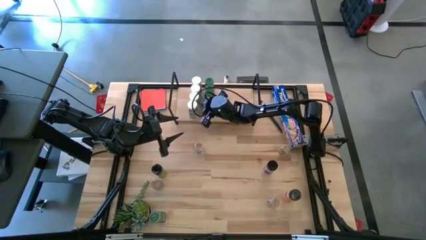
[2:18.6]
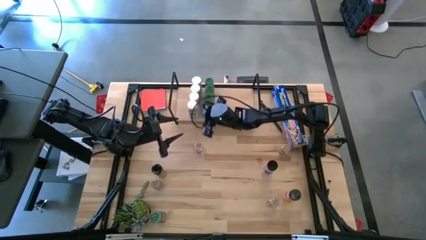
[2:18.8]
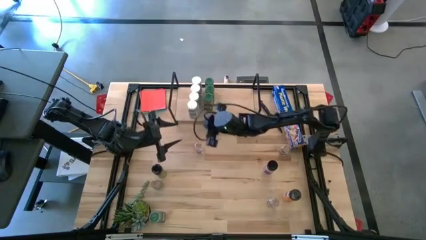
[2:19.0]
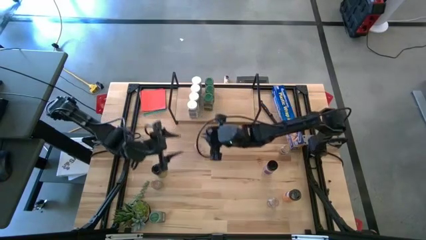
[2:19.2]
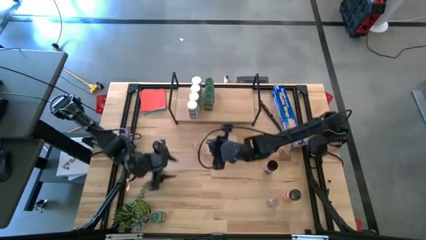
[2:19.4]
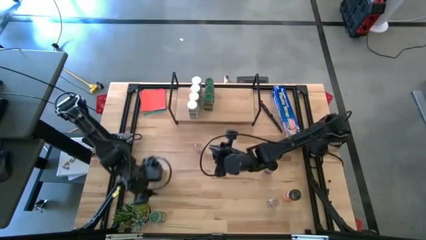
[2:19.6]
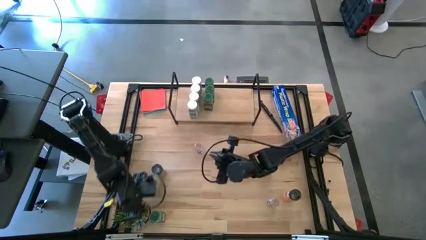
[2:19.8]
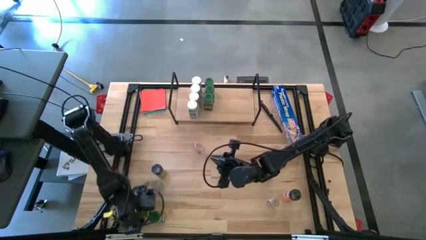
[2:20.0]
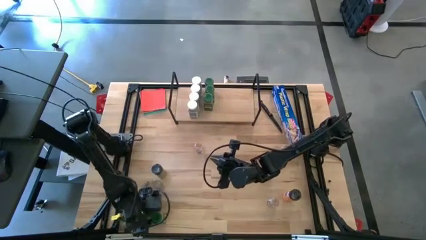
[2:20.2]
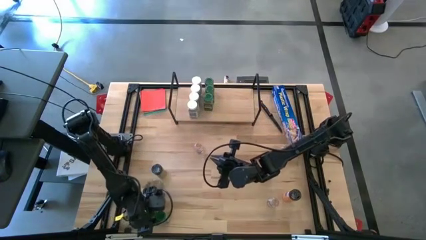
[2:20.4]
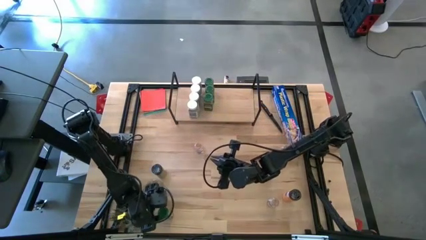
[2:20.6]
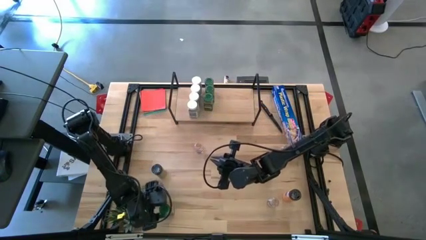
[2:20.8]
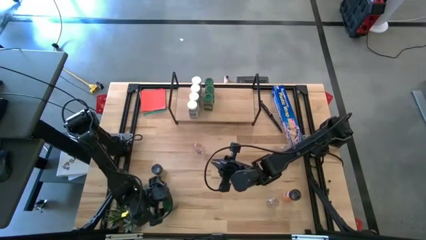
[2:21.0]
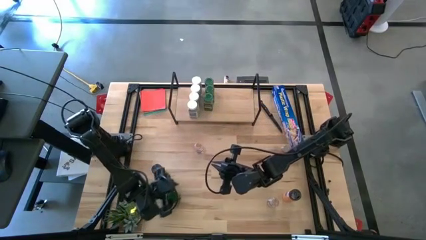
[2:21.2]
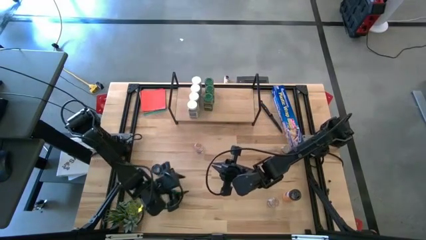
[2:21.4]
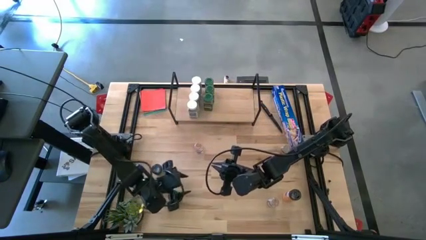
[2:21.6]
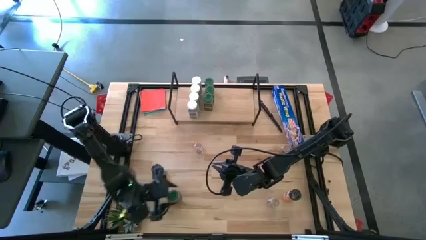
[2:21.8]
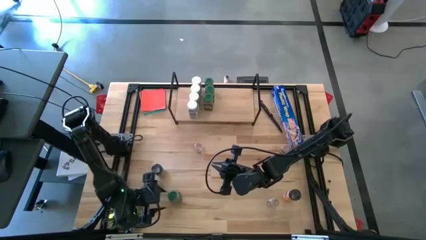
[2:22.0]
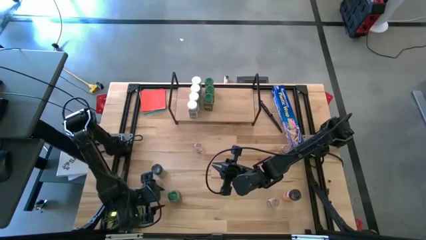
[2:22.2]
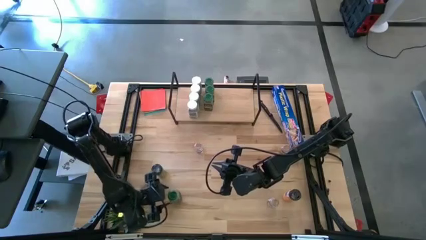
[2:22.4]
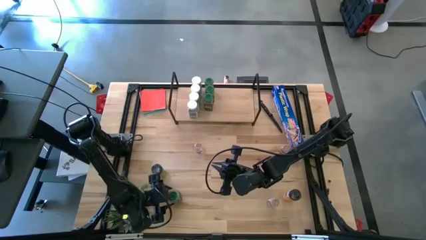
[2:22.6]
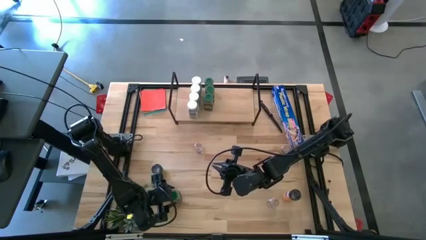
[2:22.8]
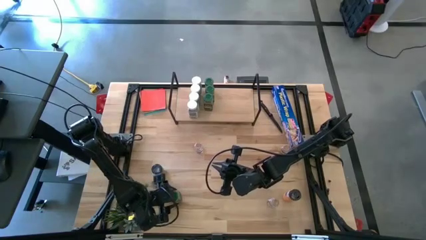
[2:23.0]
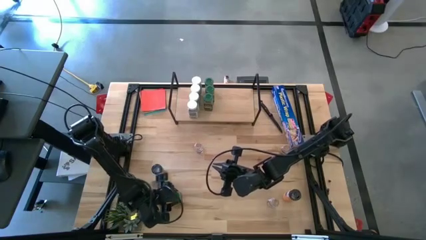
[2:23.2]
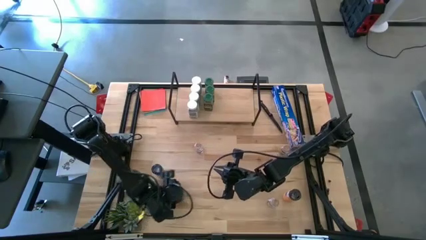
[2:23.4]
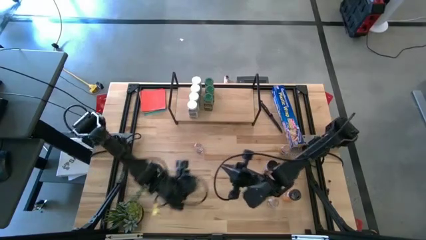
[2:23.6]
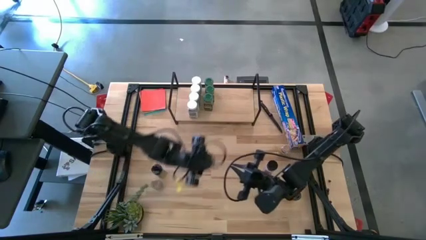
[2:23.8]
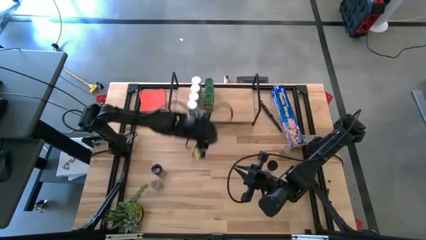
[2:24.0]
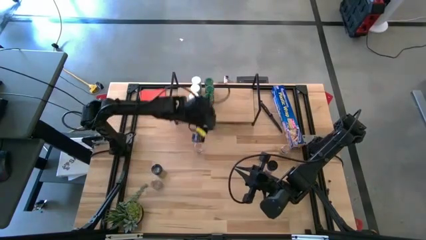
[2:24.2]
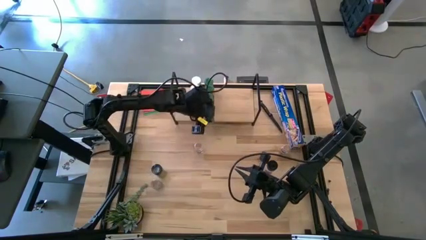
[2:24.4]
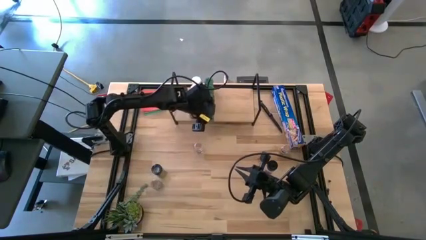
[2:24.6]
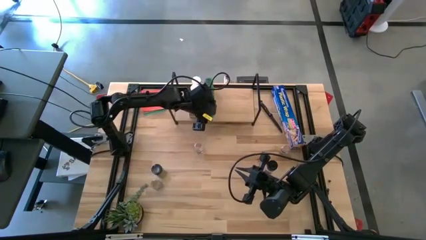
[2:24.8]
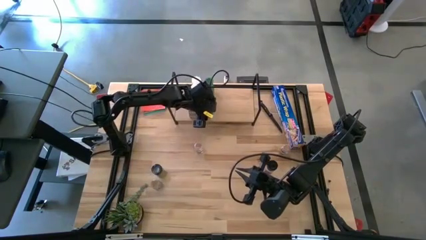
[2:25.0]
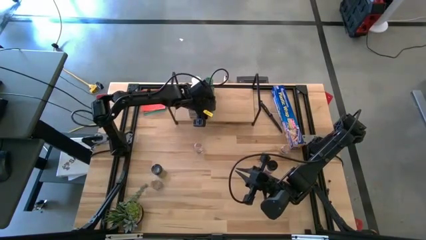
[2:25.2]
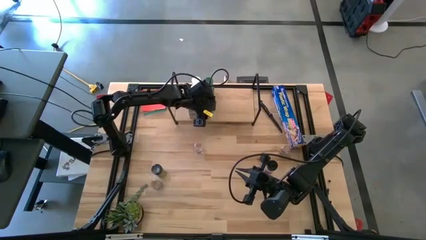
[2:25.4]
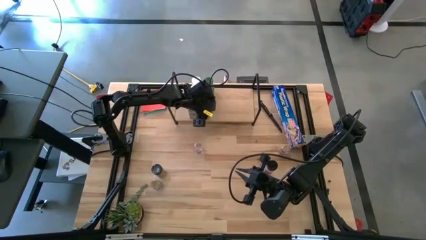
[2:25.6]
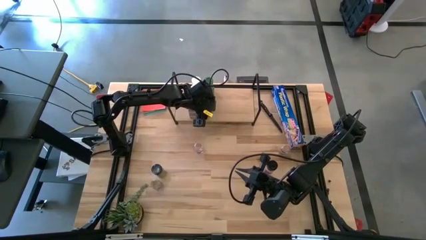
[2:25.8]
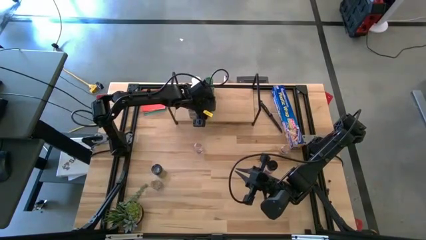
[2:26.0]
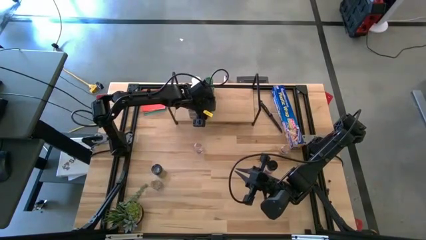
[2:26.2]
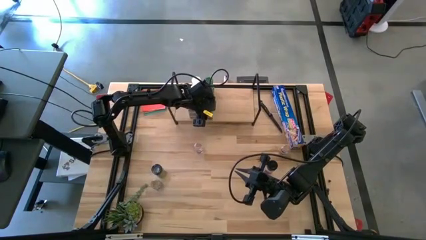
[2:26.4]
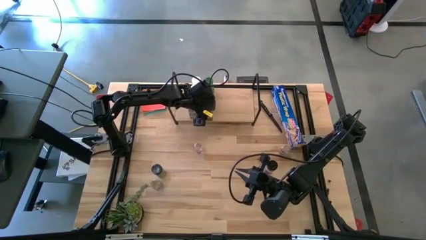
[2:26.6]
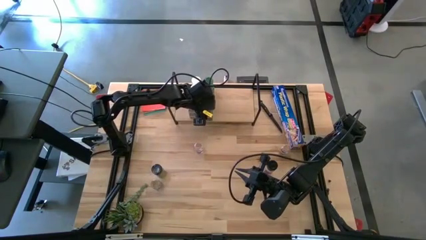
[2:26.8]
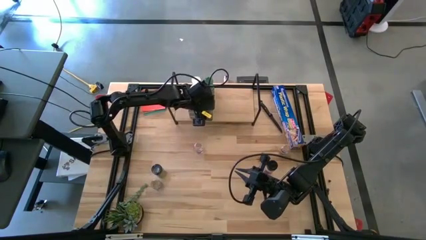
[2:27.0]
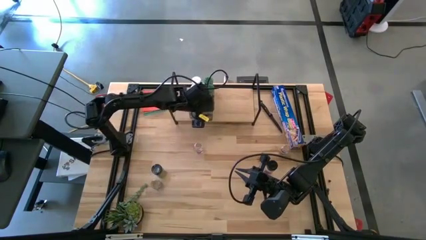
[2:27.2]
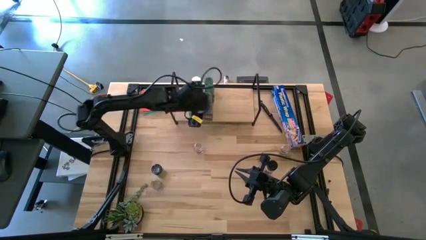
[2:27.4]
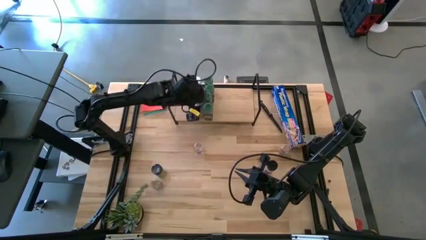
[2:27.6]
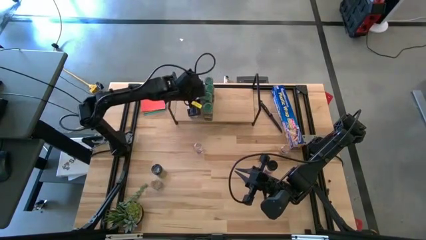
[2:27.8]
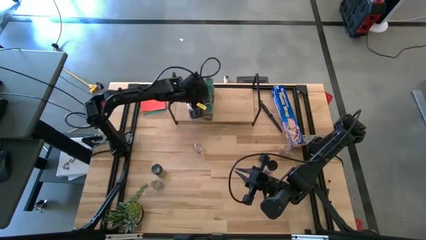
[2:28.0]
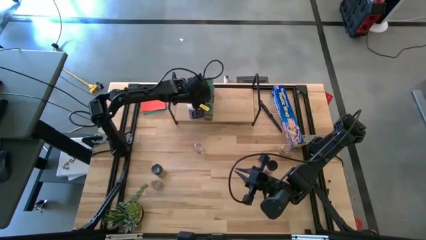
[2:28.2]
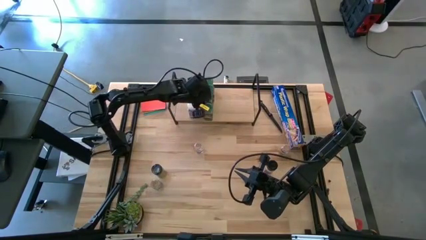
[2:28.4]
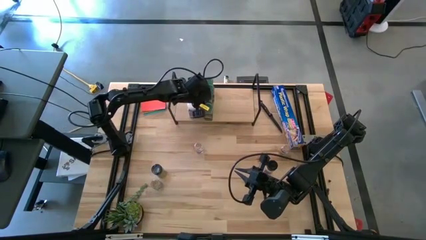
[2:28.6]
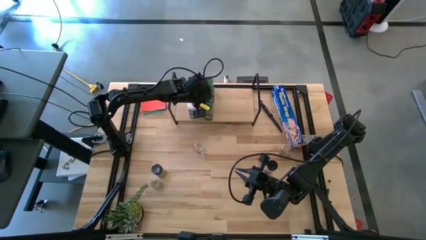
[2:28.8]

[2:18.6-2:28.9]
Task: Shelf spices
Put the green seasoning bottle on the shelf

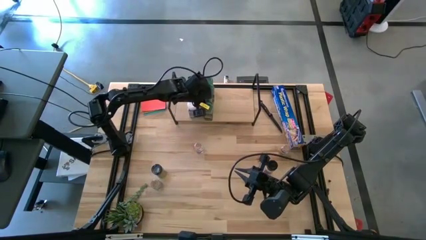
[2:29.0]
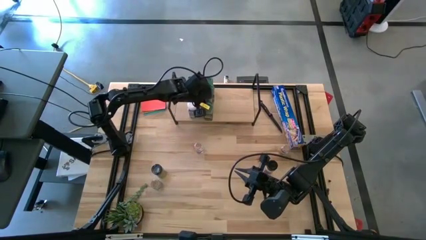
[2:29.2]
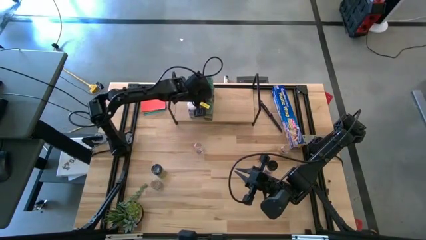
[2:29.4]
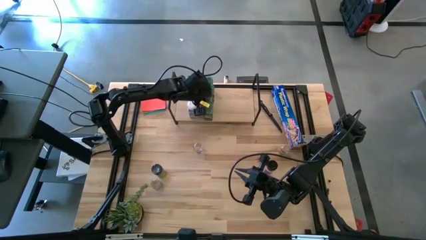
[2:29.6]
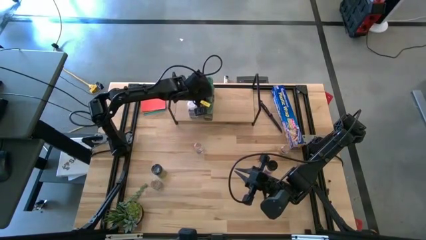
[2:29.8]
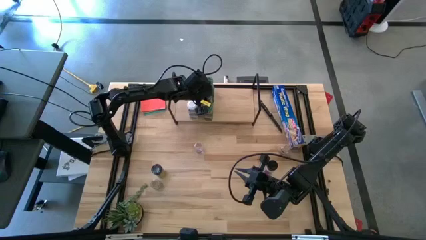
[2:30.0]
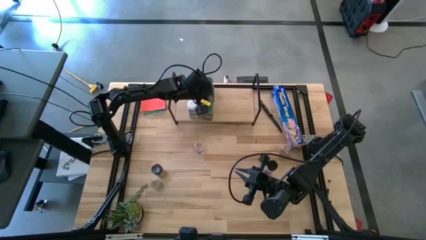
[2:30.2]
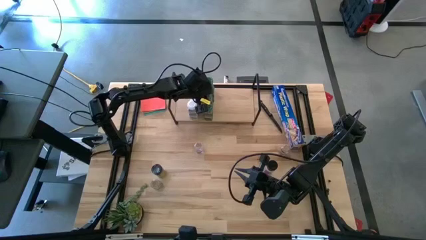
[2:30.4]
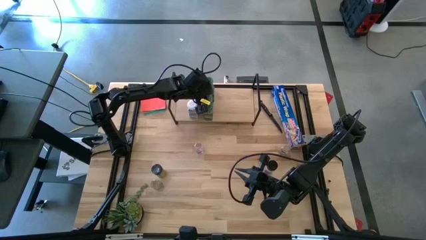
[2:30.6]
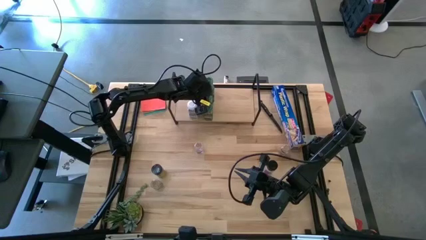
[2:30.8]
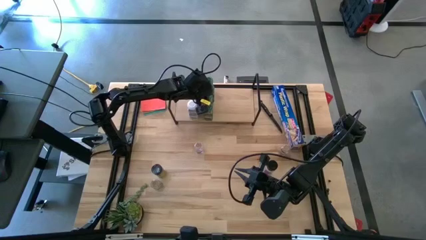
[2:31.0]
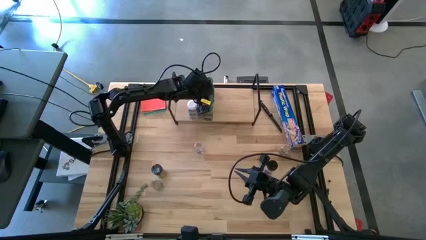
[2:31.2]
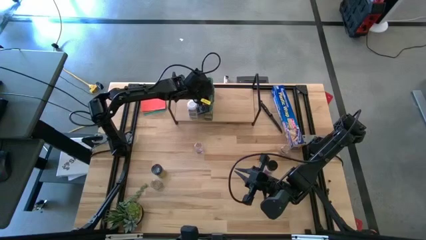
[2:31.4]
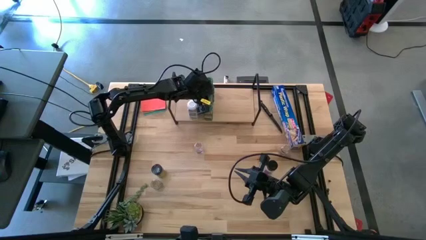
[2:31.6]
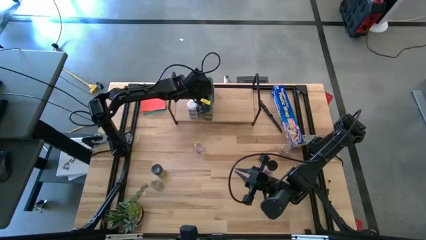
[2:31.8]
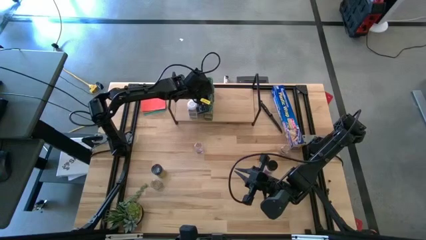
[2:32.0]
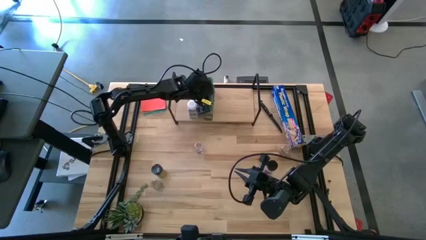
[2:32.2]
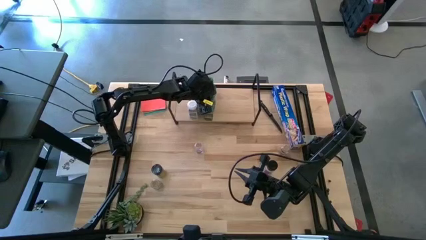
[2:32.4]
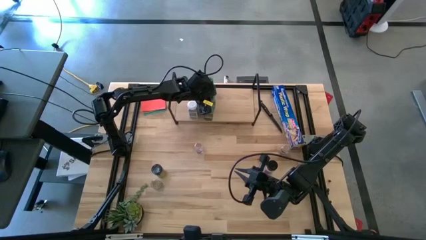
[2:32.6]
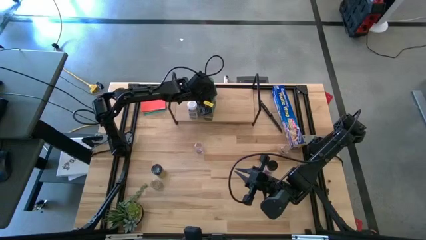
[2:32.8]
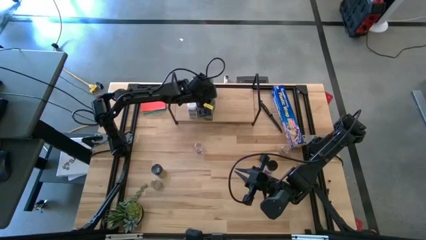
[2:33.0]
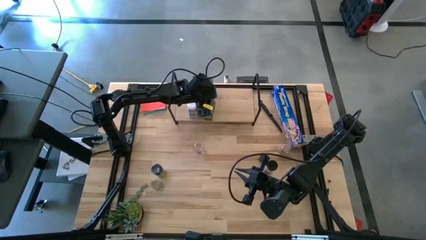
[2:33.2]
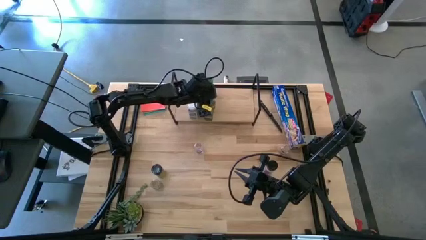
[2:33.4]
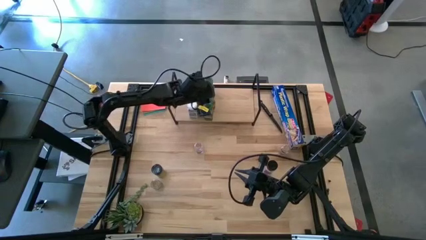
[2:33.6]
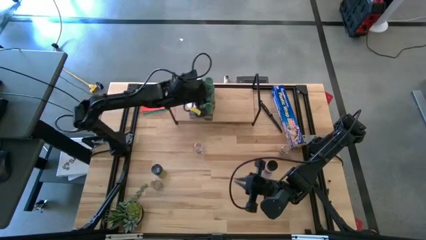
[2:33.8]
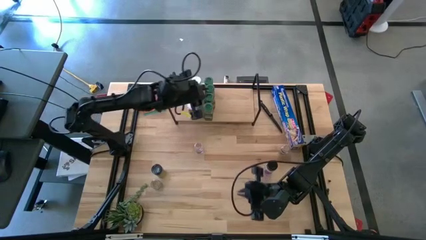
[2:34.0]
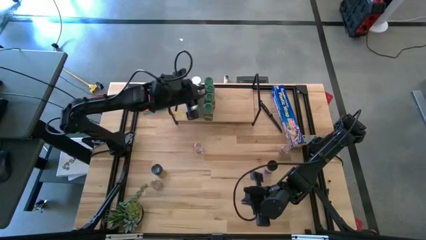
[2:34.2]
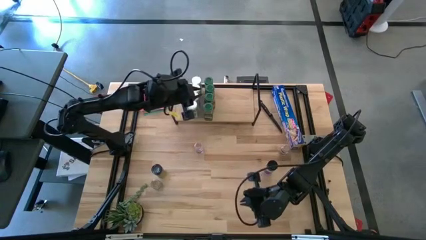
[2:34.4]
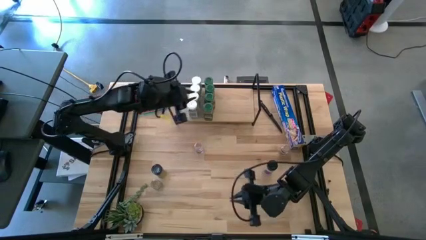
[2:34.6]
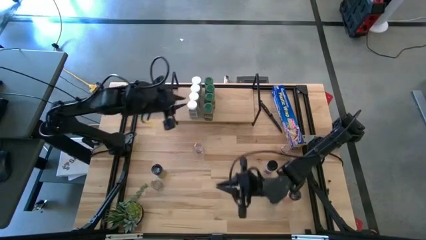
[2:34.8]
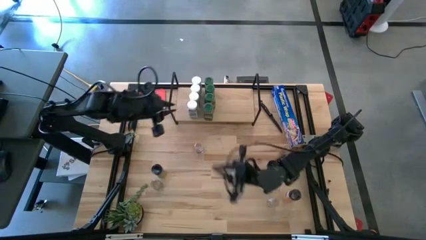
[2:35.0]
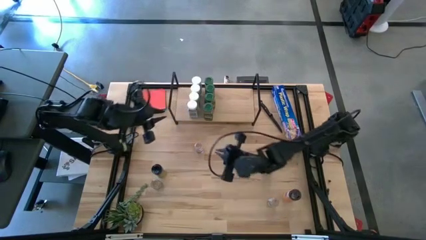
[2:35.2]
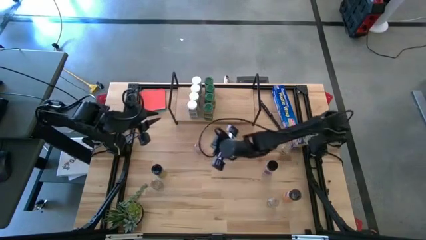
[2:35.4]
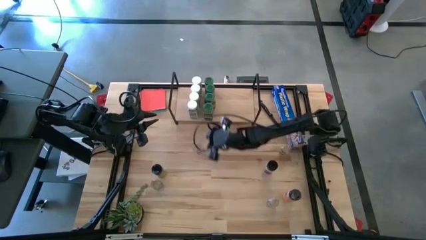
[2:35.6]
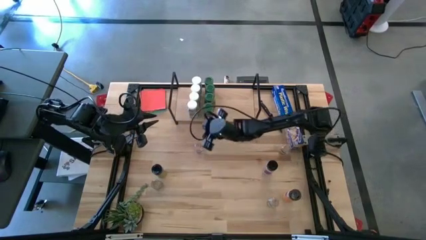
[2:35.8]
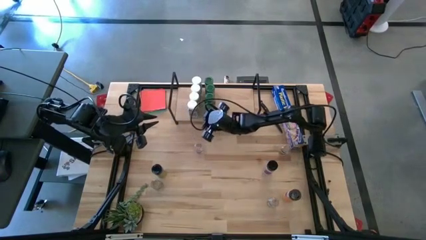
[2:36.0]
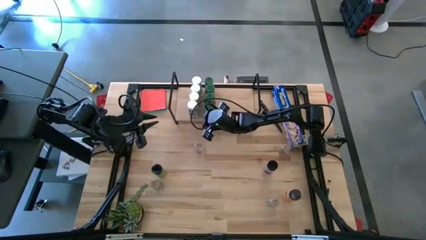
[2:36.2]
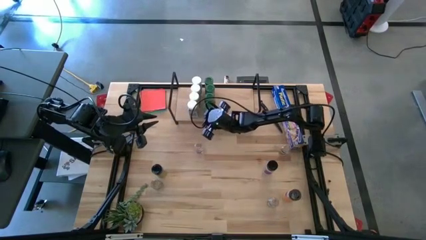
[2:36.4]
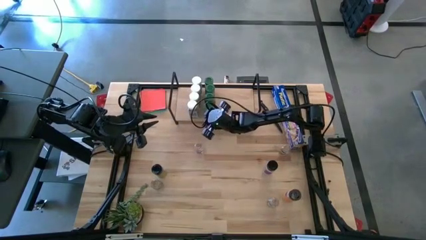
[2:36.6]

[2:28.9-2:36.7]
Adjust the front green seasoning bottle
